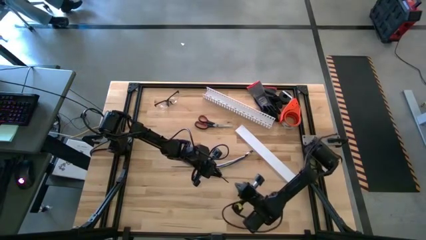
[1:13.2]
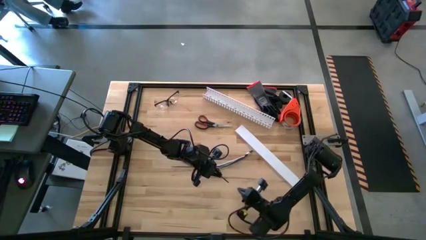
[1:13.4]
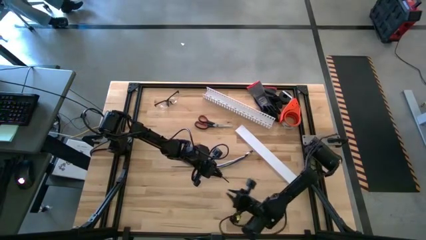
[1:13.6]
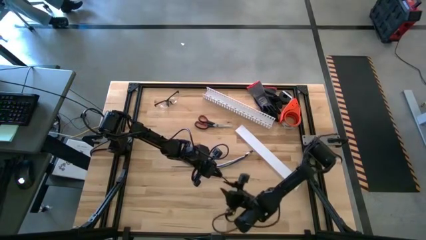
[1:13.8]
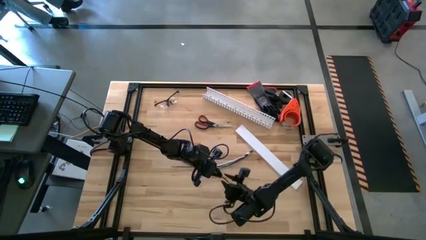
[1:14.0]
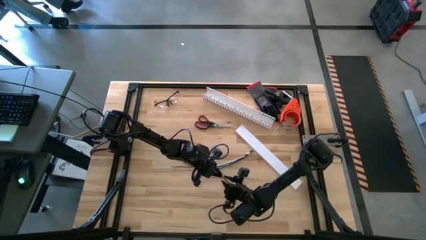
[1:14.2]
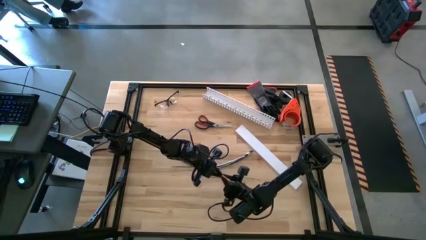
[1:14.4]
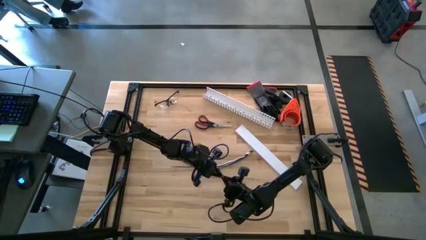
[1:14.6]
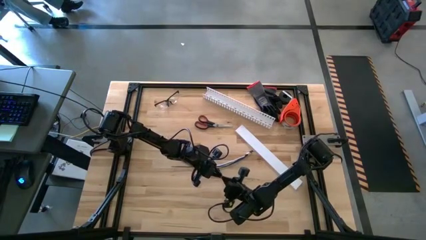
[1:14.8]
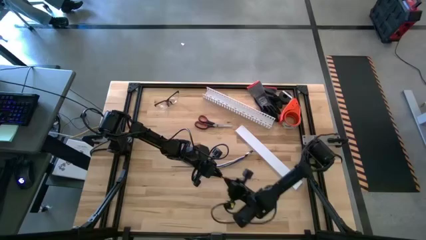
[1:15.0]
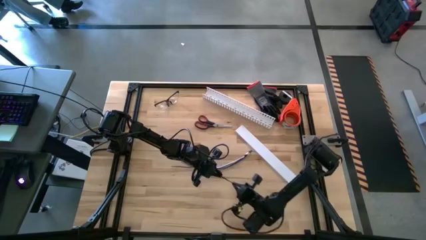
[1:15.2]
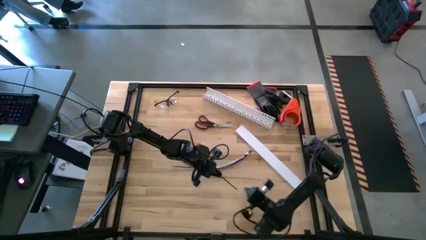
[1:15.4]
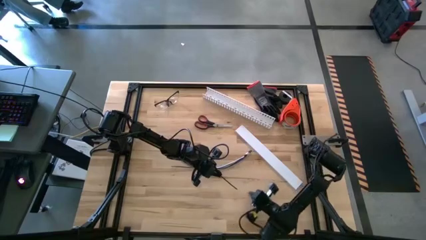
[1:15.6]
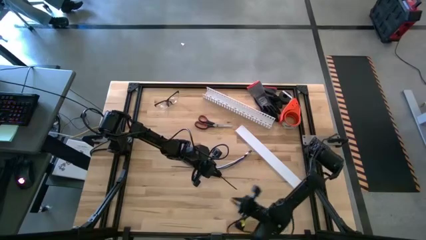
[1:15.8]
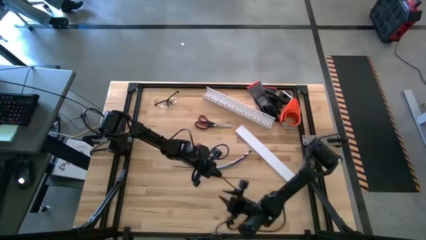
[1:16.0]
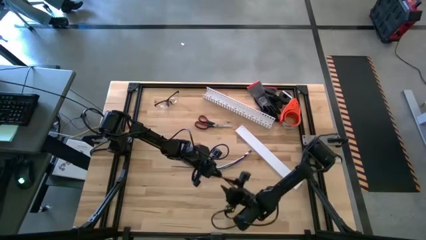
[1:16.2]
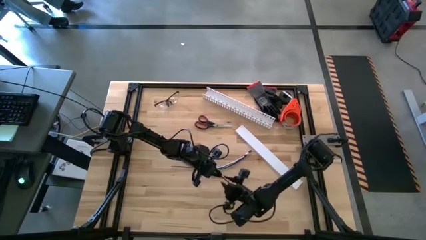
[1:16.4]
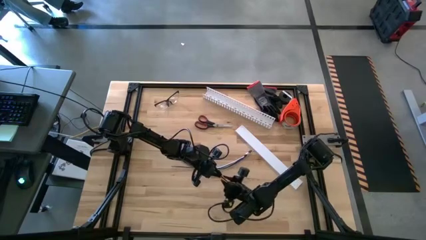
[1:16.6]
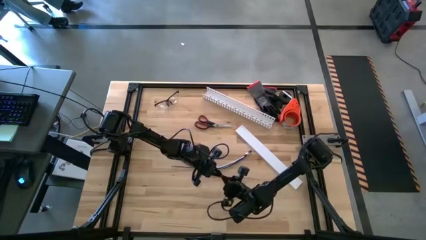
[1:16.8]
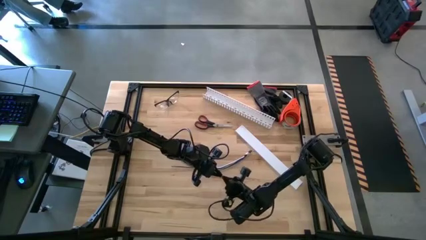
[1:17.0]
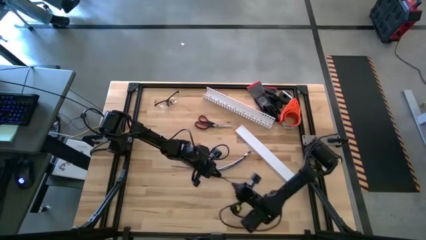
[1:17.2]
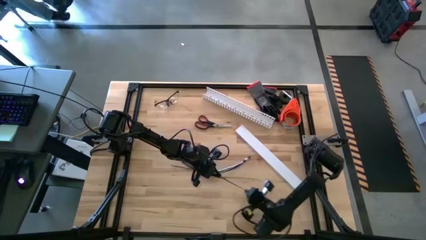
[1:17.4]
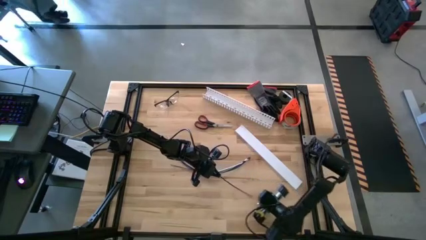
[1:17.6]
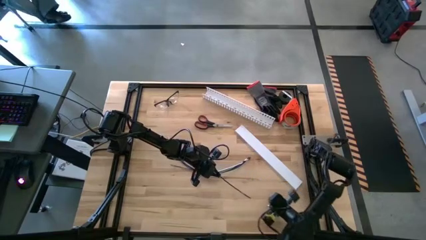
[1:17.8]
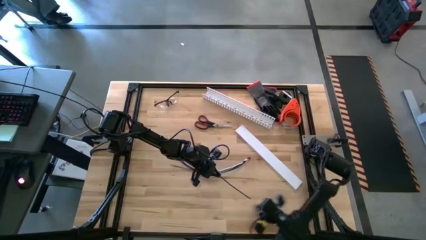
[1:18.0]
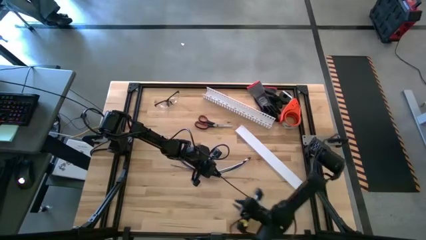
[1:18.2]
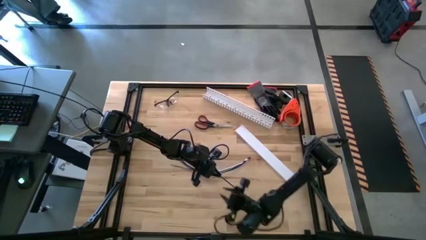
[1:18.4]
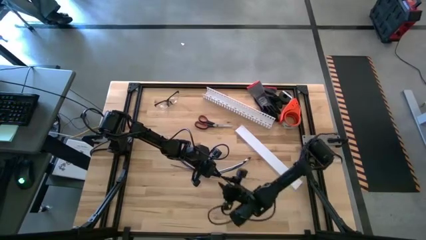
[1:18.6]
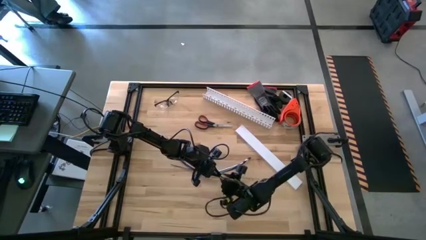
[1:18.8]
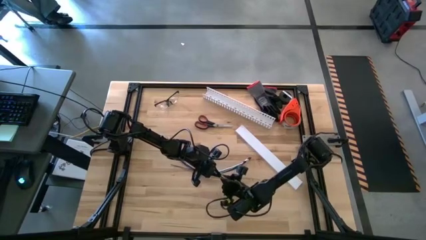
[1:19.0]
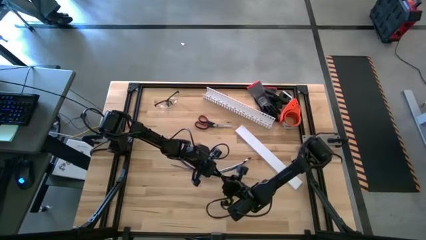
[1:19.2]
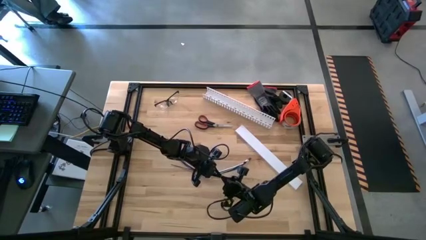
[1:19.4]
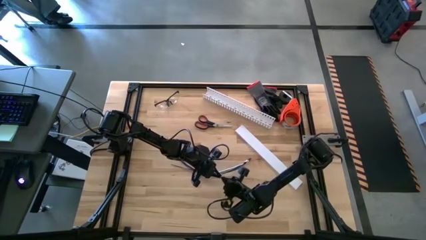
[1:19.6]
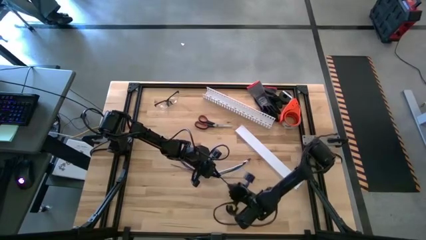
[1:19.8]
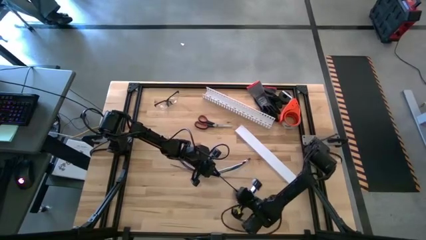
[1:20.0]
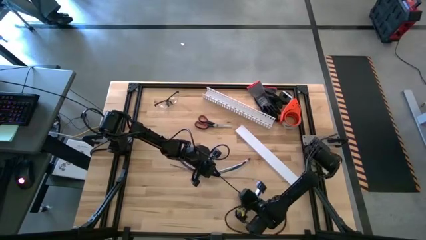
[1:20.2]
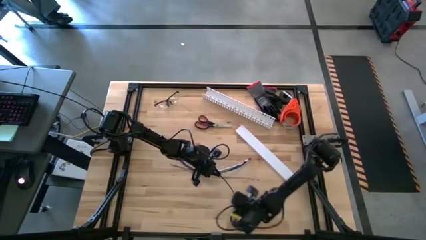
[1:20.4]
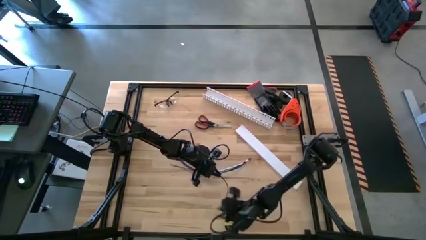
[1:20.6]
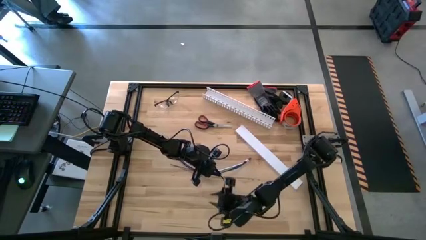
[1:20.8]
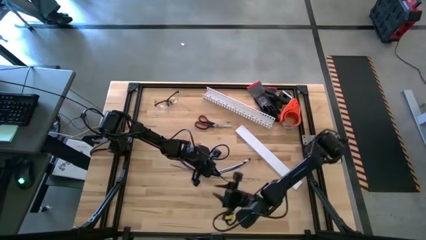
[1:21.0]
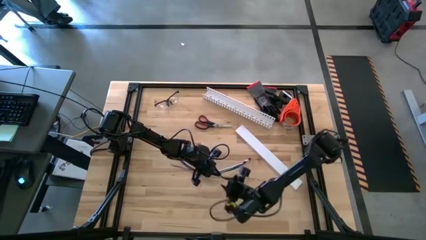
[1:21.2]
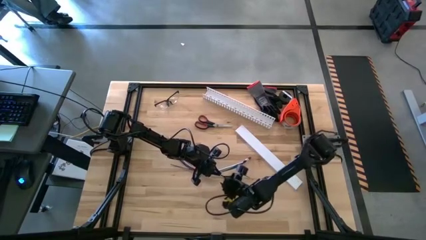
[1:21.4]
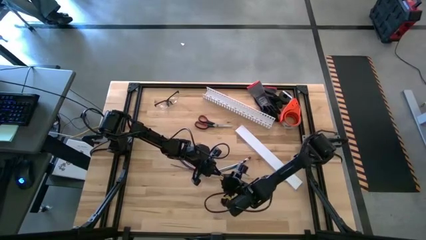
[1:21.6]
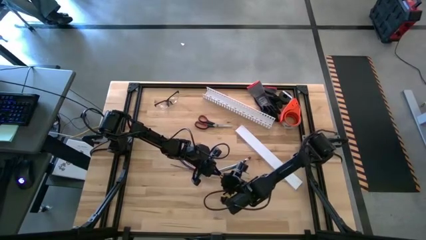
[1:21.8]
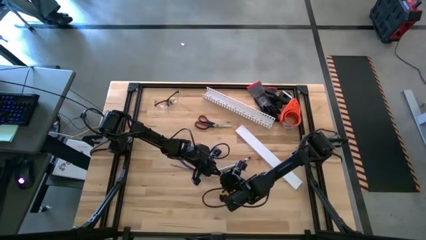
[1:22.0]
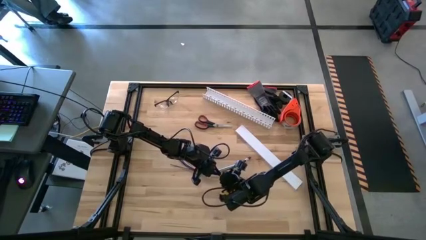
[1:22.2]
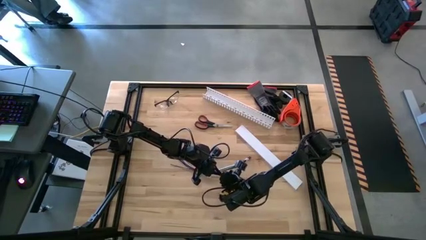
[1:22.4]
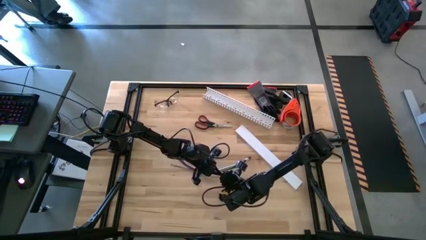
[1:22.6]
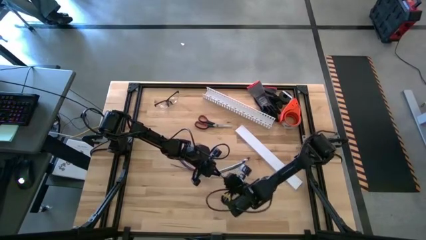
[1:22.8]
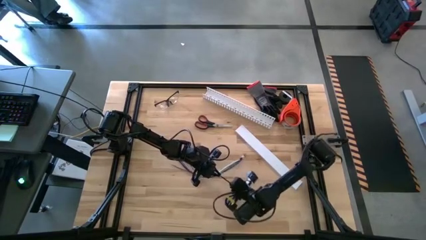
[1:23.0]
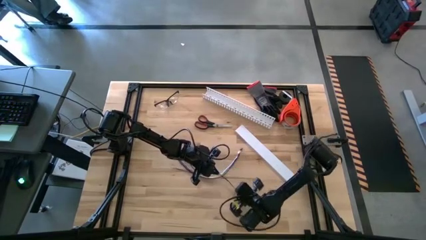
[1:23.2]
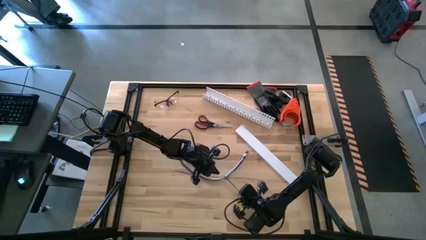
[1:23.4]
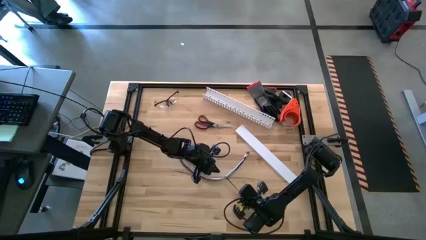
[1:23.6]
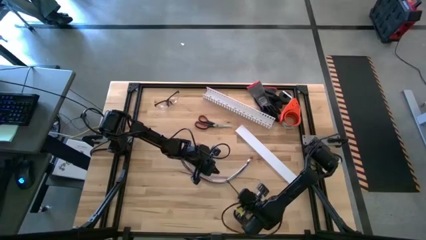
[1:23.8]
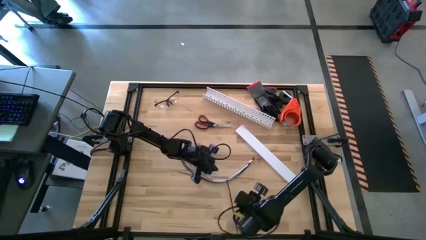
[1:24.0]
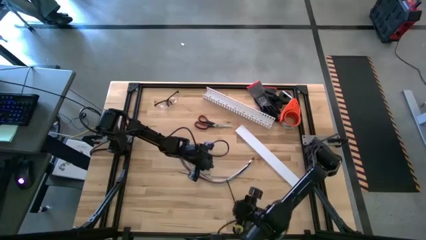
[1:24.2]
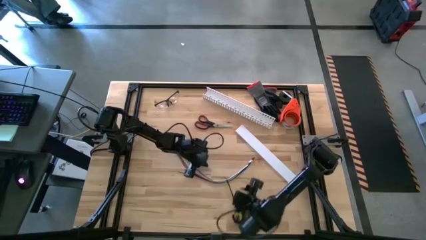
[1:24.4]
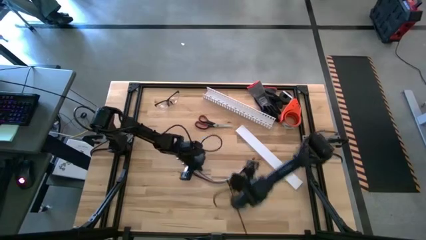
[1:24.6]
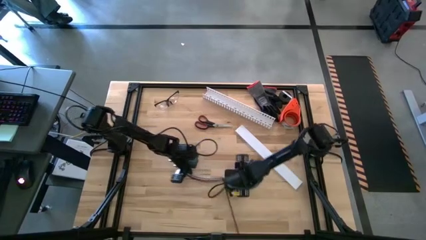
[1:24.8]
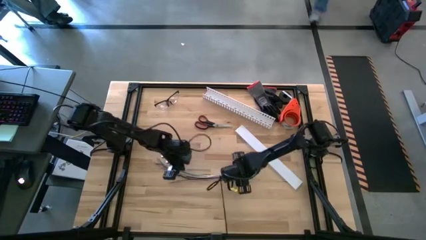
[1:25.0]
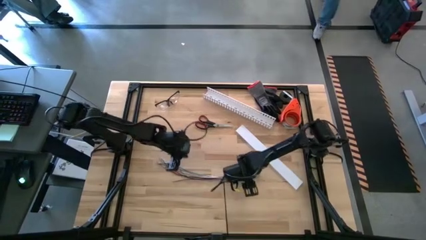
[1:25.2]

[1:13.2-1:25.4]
Task: Ziptie cables
Wrap the cable wires with a black ziptie
